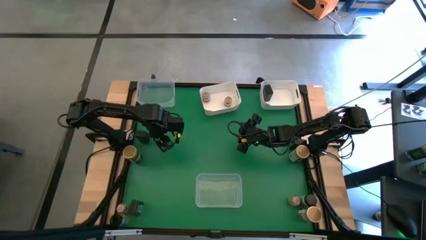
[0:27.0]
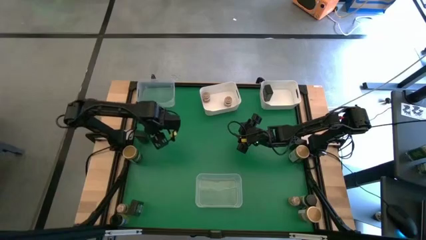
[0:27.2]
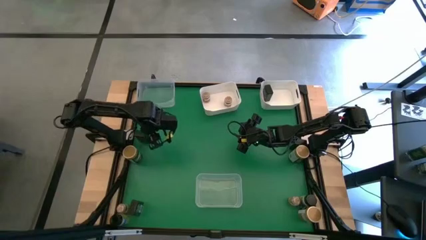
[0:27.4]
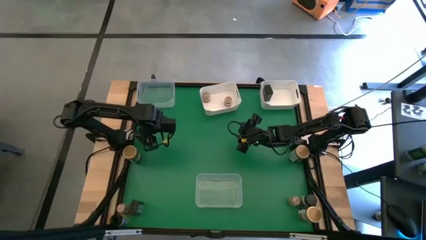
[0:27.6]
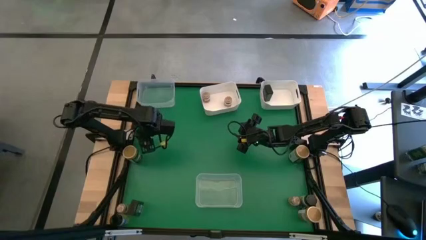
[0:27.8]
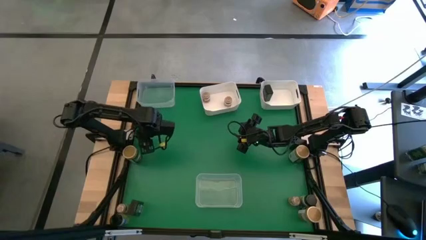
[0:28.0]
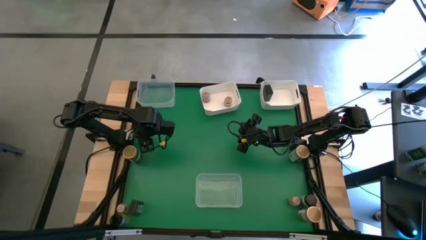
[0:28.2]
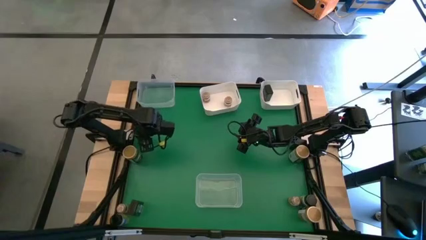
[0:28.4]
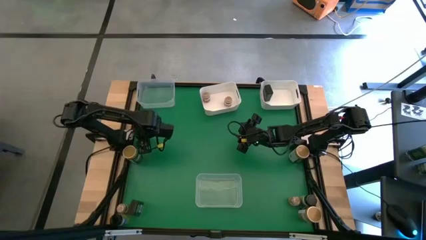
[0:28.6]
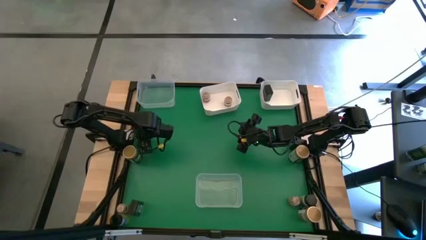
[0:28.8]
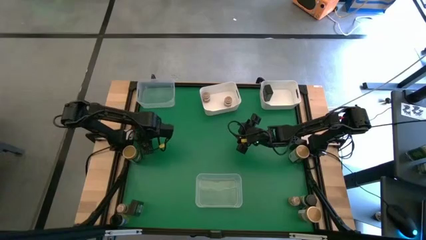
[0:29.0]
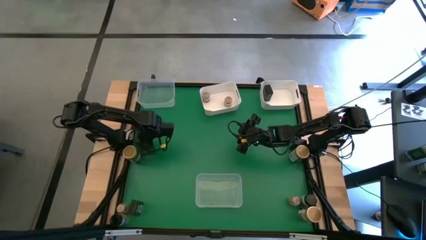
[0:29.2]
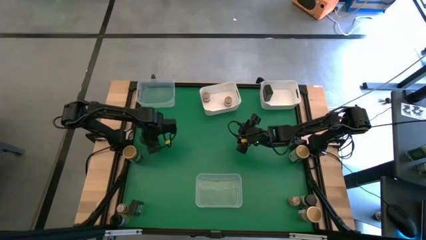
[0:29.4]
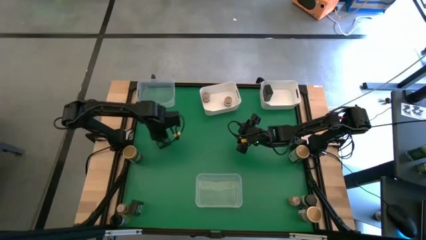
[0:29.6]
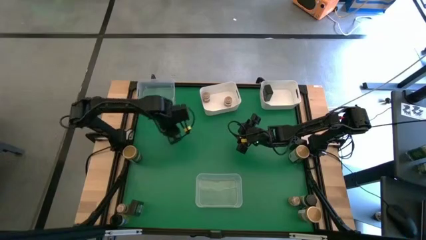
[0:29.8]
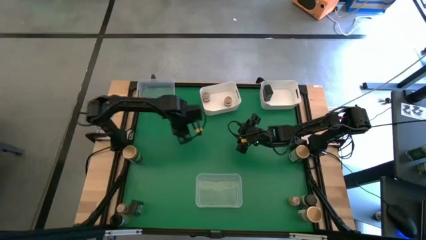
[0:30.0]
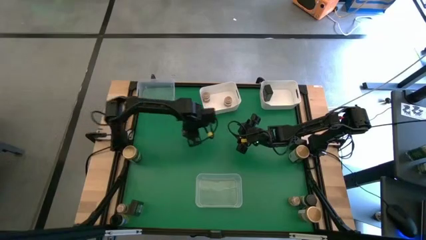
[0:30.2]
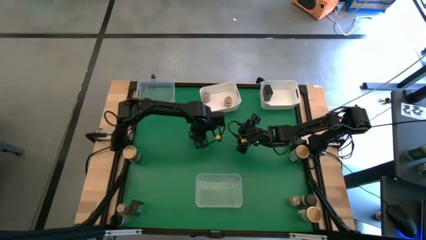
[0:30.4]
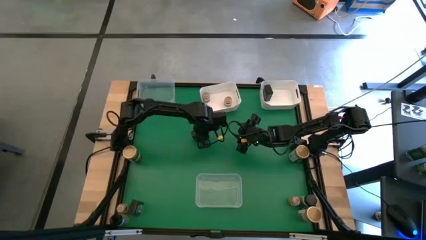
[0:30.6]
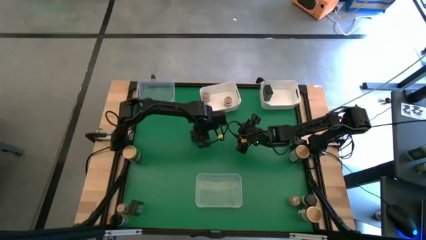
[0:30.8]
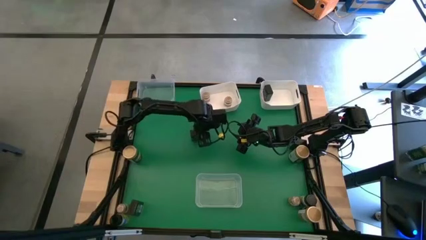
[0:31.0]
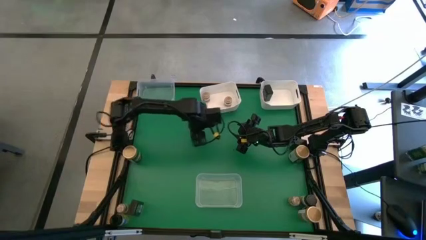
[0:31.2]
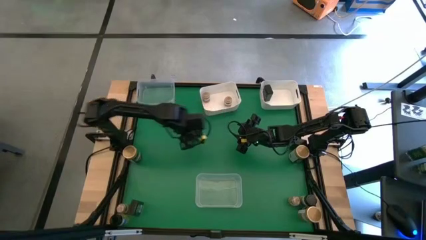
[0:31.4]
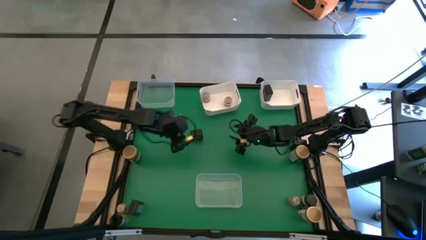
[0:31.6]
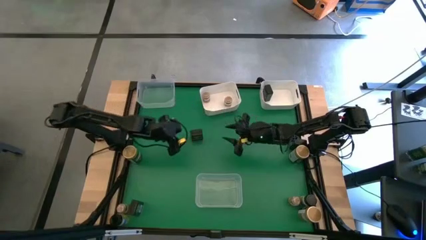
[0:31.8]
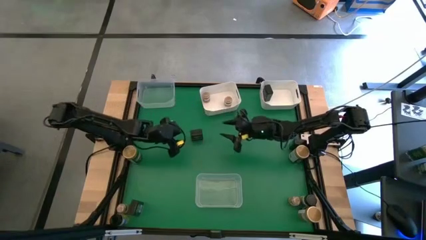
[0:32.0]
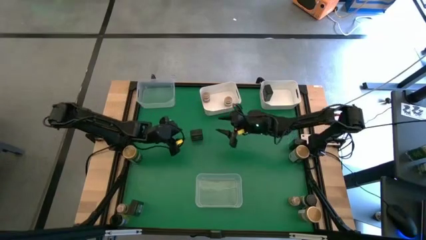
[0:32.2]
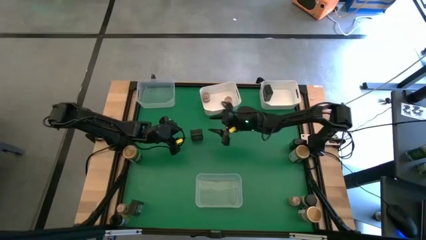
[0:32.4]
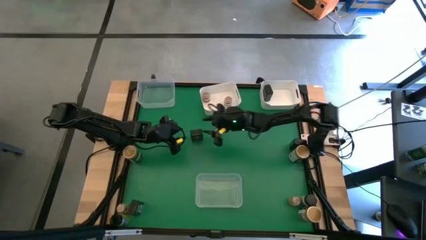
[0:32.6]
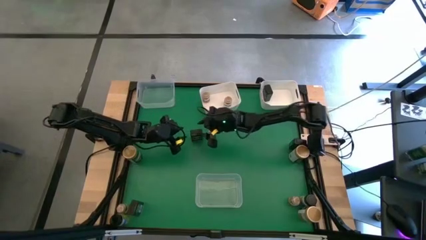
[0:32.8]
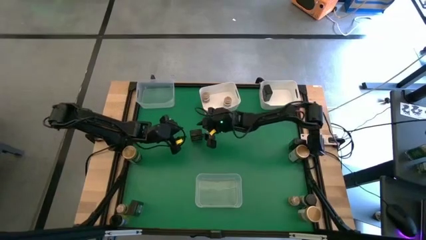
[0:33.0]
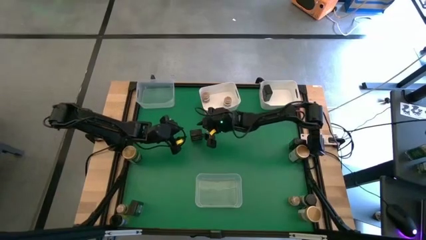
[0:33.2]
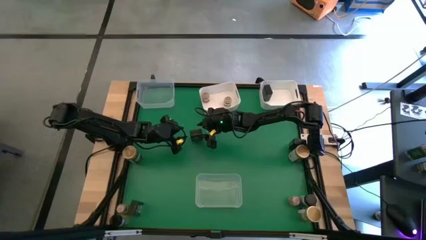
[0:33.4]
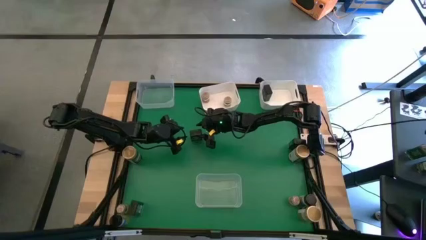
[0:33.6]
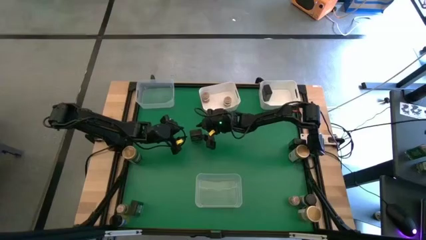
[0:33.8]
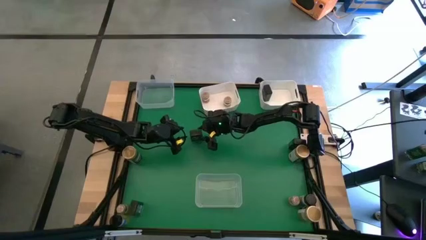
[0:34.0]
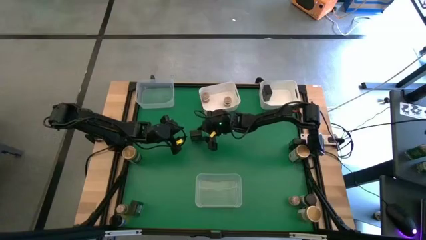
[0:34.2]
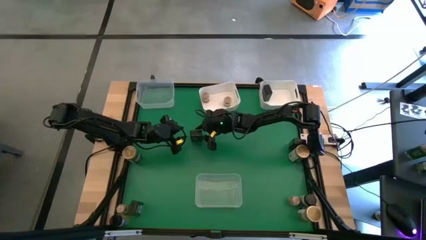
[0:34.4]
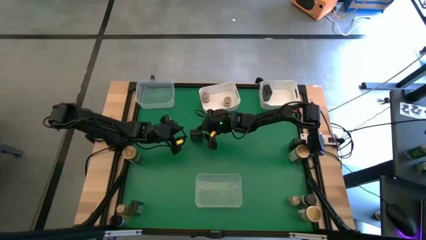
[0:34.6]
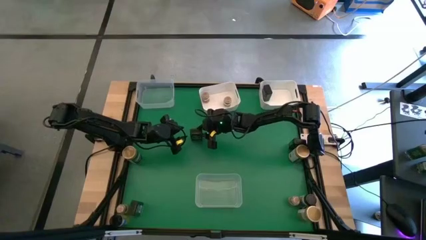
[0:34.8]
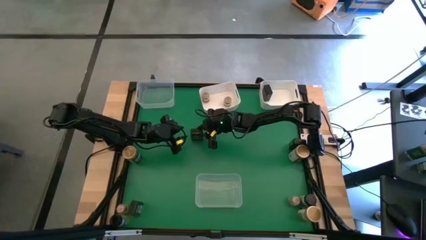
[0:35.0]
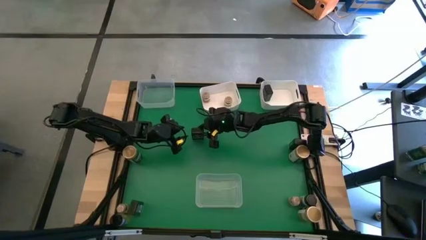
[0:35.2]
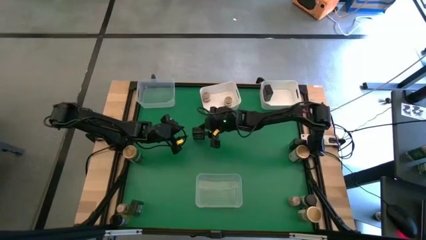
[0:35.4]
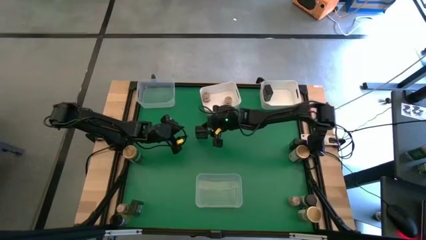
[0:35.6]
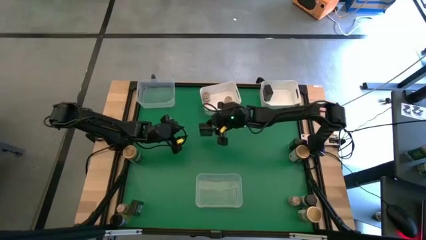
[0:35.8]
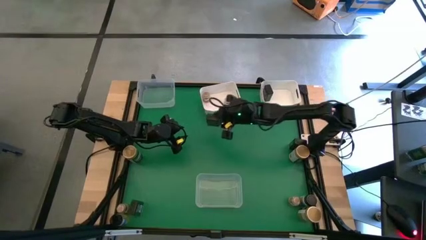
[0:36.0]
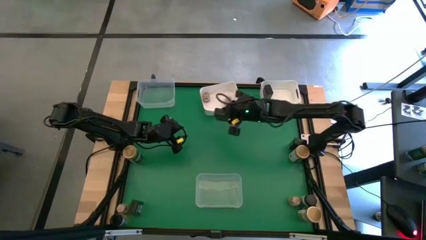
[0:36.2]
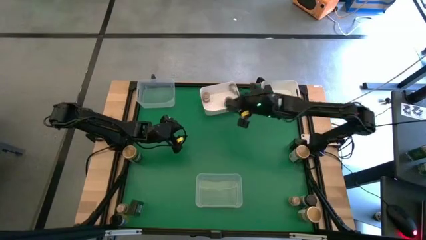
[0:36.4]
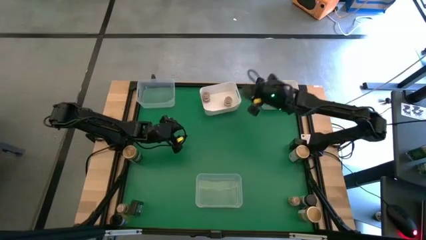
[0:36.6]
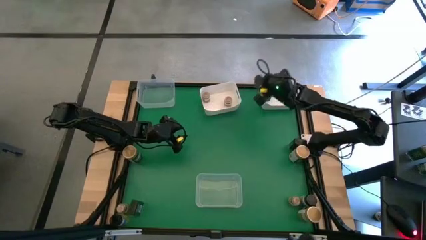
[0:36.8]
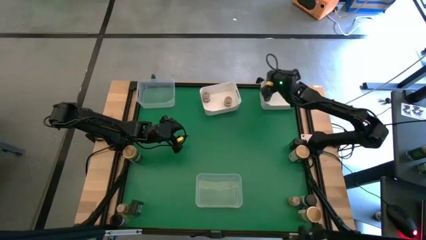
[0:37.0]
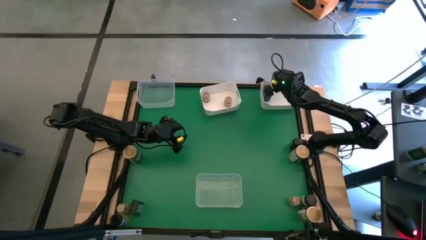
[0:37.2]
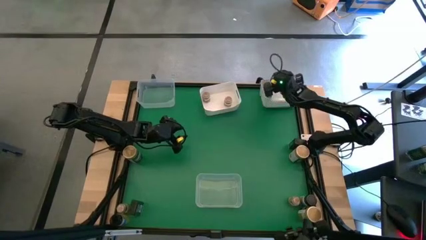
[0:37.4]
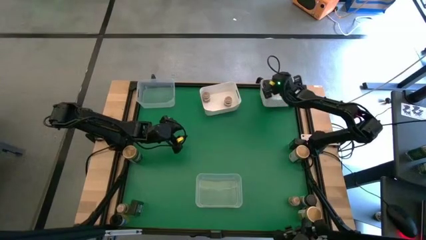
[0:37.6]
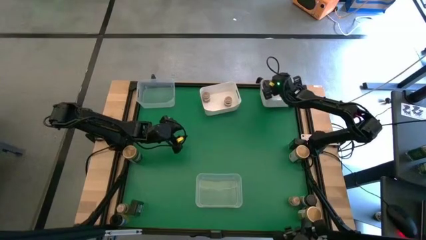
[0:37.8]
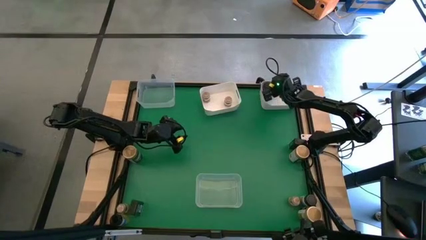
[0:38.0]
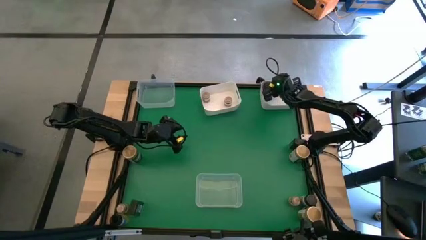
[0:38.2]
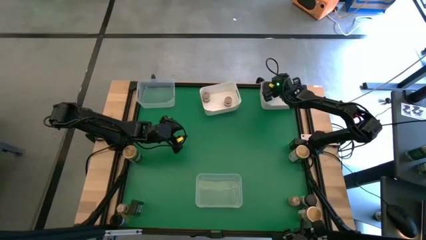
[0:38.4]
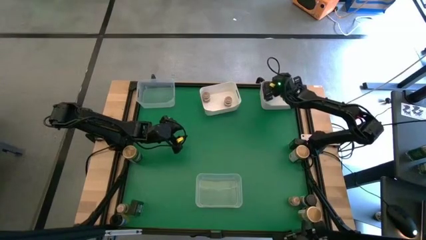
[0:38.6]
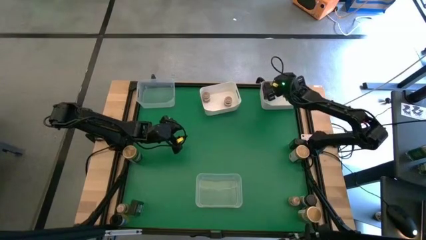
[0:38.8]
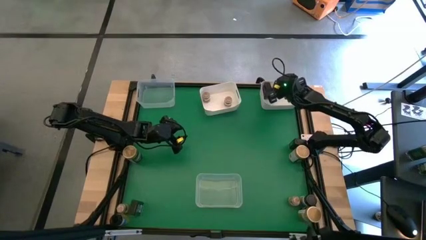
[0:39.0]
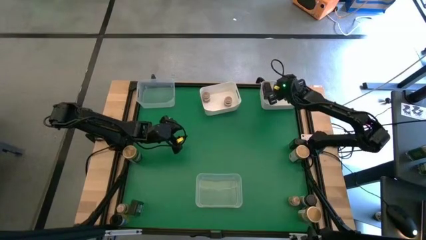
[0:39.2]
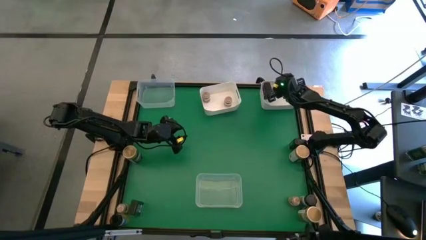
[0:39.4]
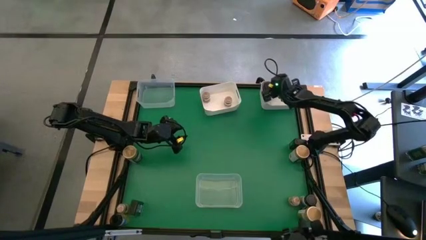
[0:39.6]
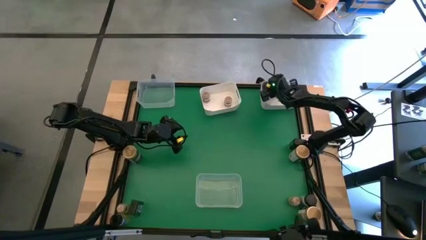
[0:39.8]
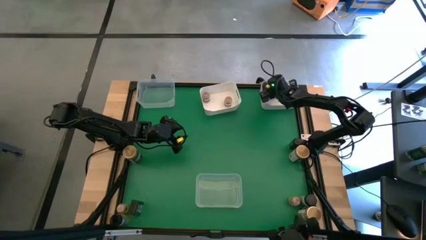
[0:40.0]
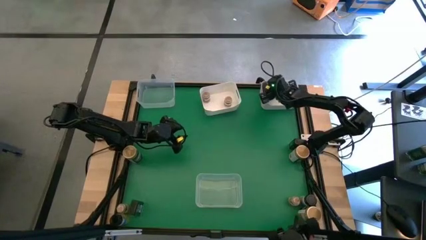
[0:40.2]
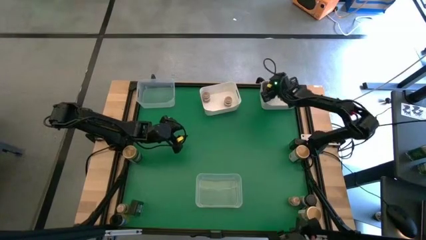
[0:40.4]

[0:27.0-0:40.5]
Task: Sort spices by type
Put the green seasoning can into the right white bin

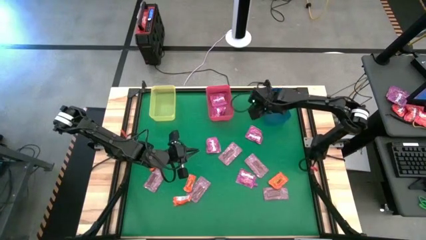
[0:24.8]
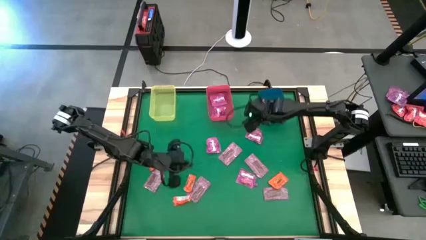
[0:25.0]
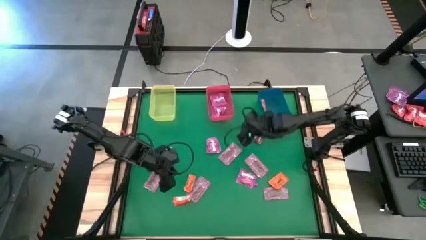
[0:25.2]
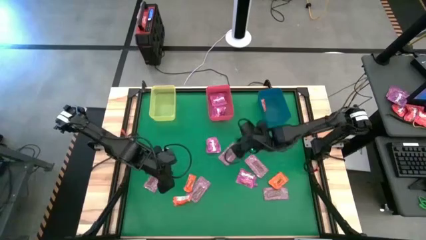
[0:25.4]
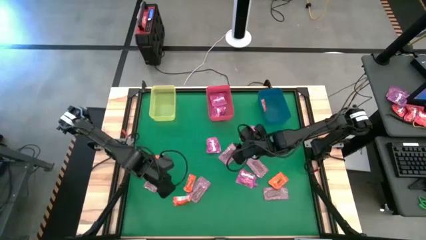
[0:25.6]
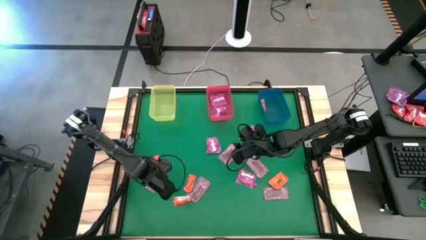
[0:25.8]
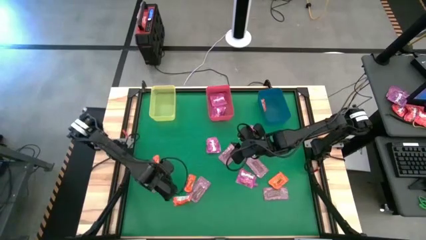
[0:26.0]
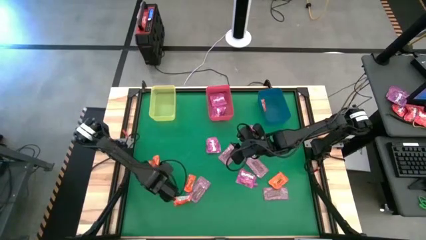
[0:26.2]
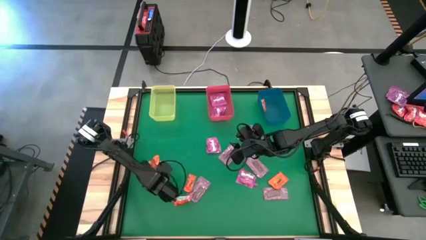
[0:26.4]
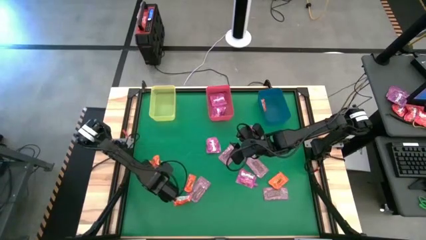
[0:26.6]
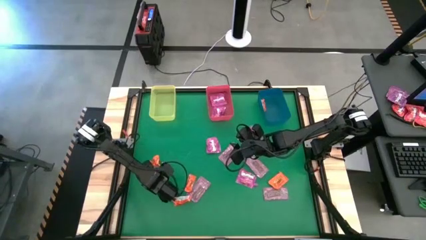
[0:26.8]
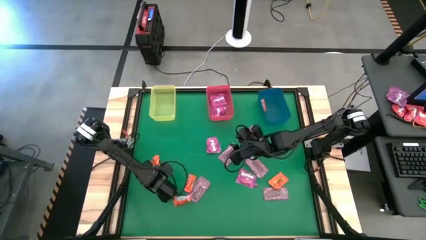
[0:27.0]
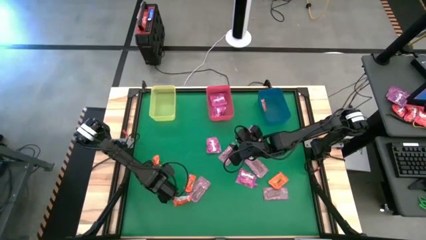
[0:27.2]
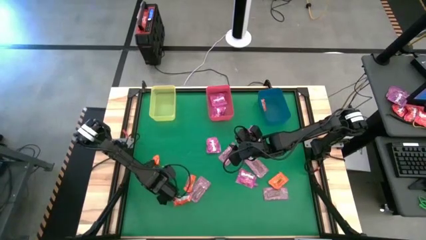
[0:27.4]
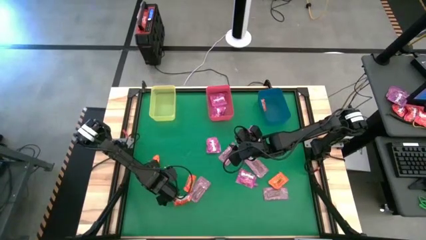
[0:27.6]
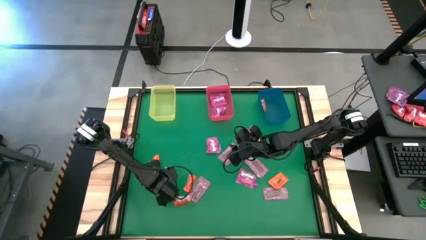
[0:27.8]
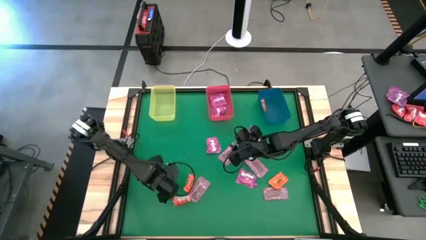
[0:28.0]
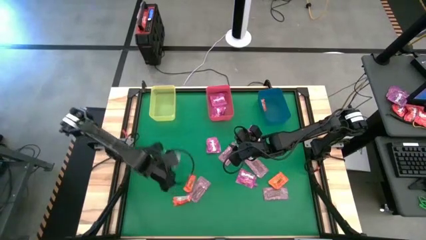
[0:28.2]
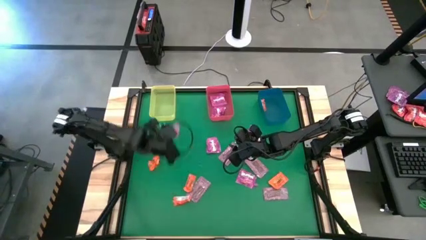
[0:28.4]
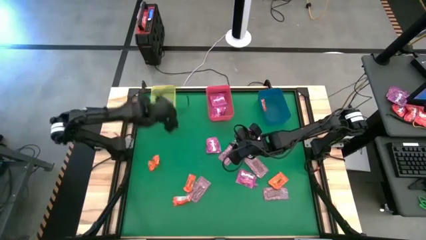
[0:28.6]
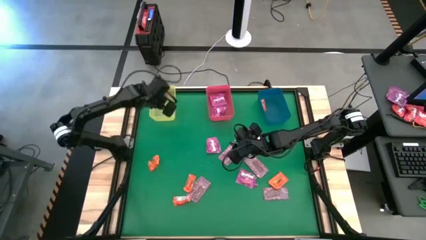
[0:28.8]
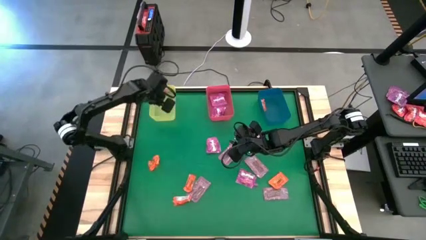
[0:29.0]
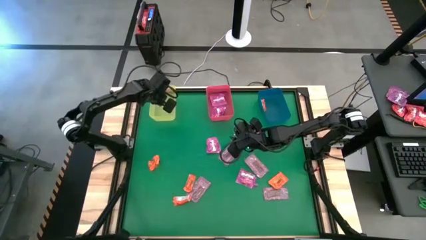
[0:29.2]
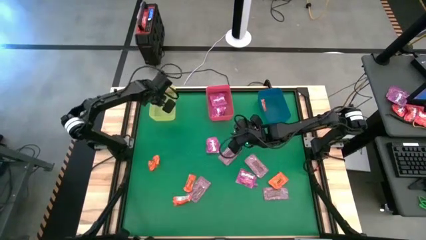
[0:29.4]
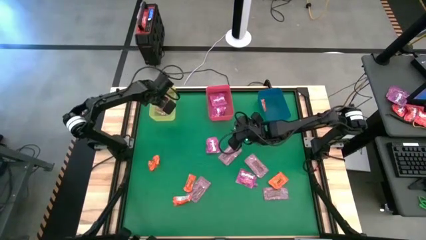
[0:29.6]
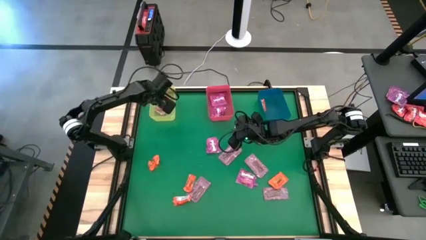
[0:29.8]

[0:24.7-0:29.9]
Task: Sort candy by brand, put in halloween buckets
Put the pink candy into the yellow bin
